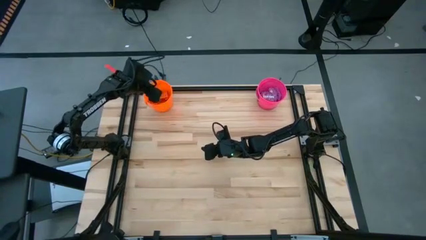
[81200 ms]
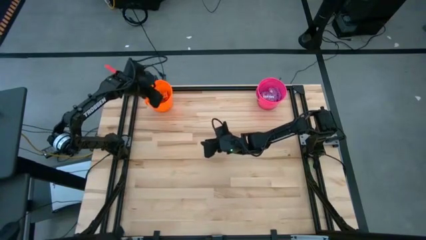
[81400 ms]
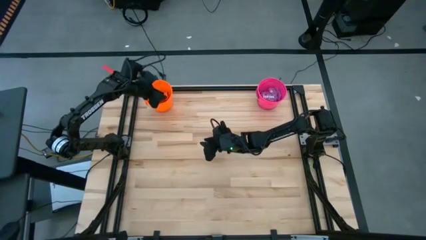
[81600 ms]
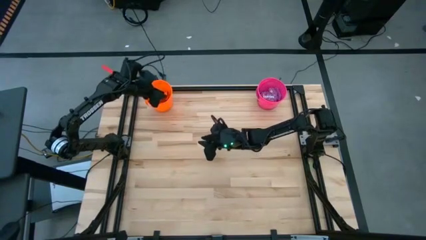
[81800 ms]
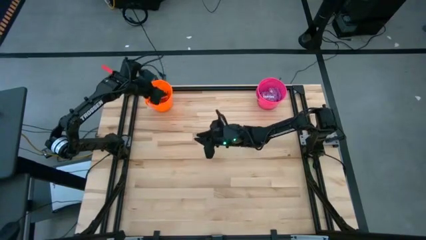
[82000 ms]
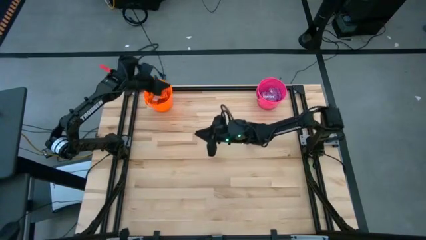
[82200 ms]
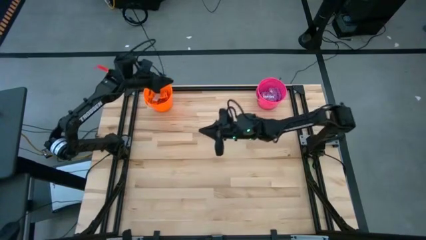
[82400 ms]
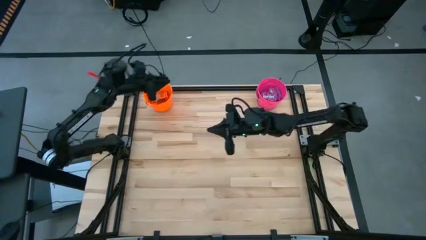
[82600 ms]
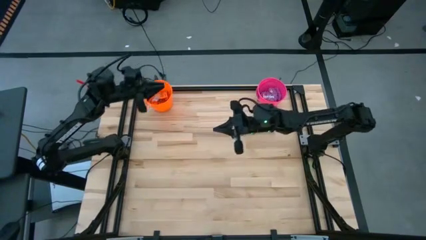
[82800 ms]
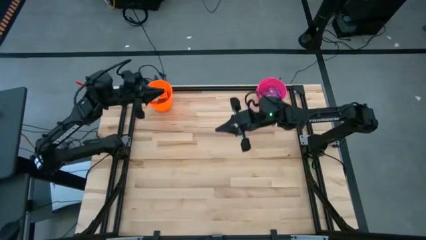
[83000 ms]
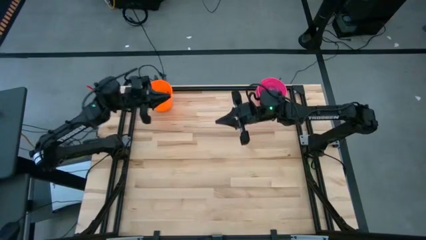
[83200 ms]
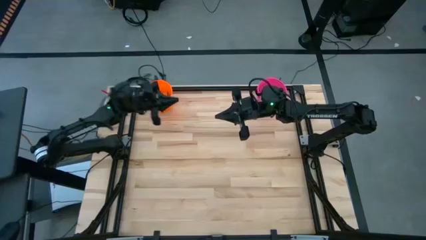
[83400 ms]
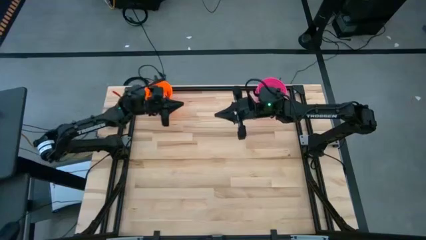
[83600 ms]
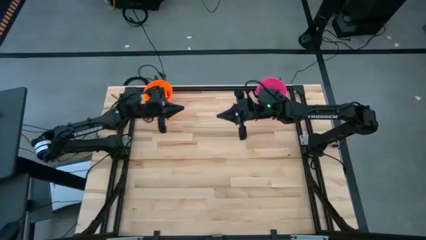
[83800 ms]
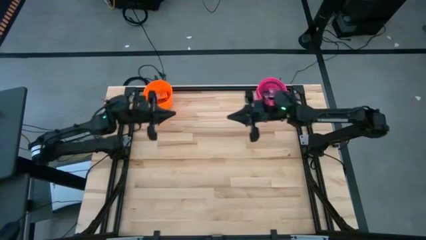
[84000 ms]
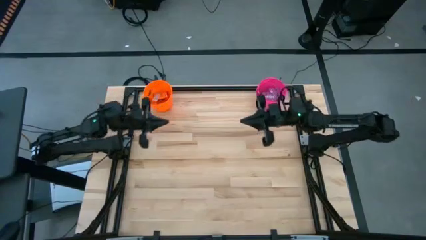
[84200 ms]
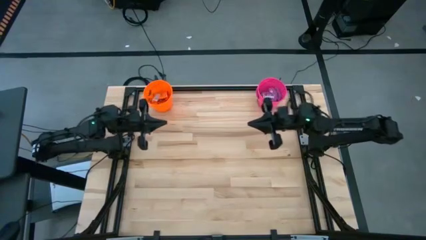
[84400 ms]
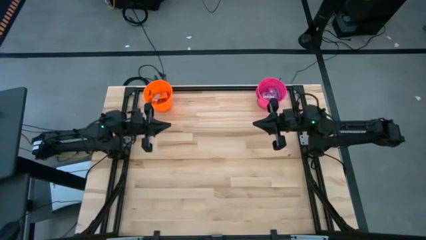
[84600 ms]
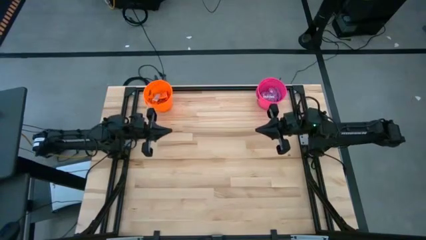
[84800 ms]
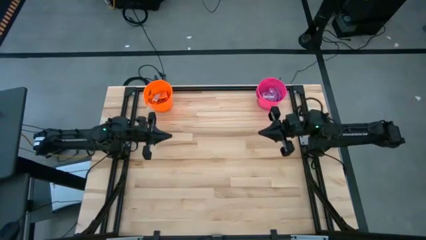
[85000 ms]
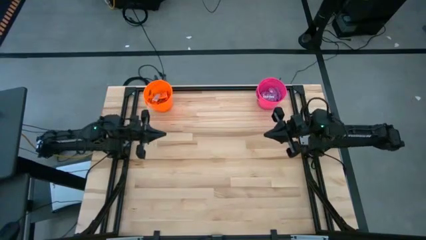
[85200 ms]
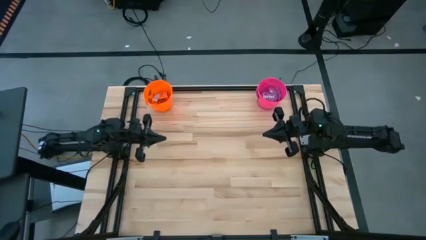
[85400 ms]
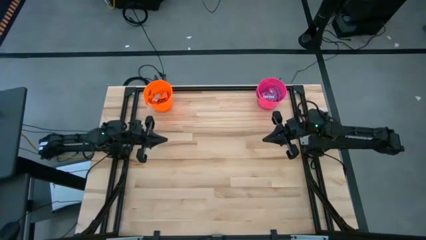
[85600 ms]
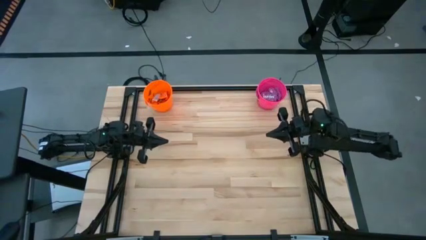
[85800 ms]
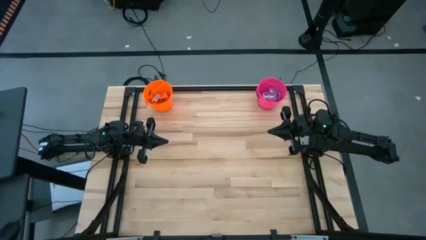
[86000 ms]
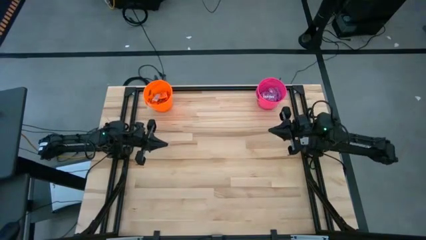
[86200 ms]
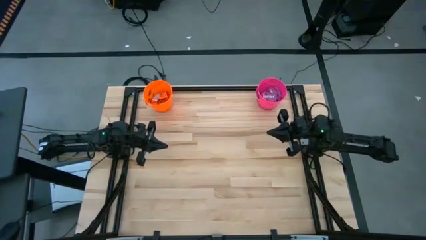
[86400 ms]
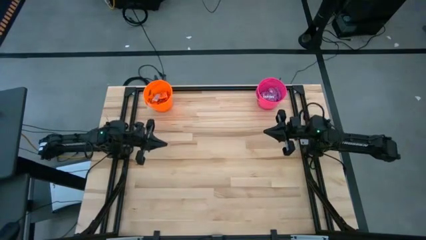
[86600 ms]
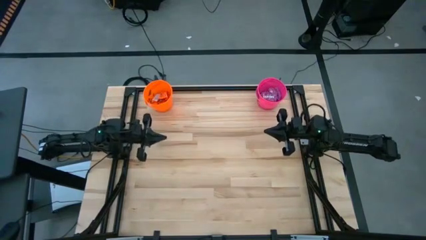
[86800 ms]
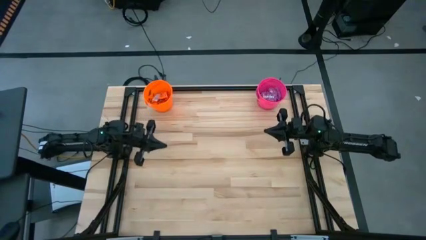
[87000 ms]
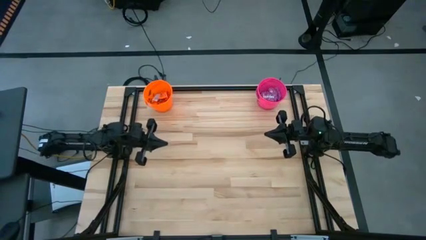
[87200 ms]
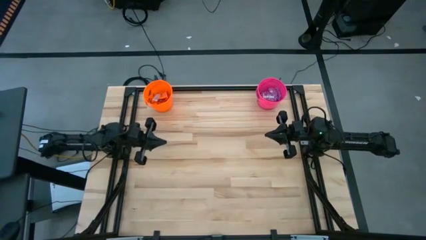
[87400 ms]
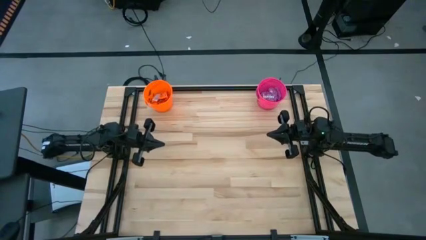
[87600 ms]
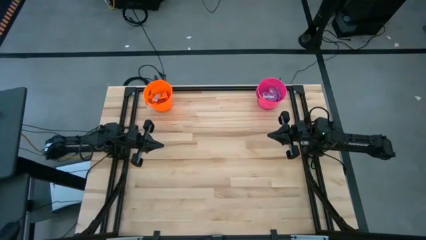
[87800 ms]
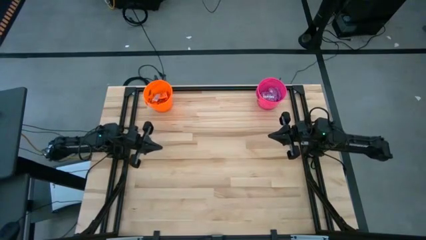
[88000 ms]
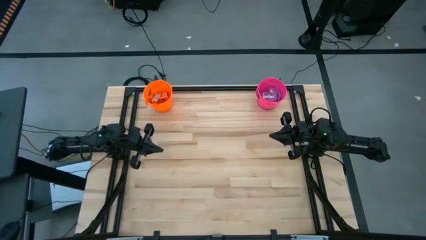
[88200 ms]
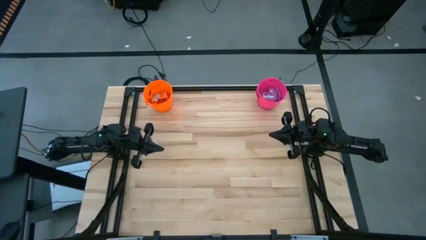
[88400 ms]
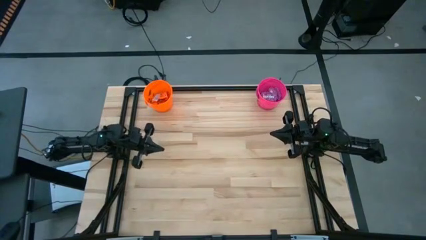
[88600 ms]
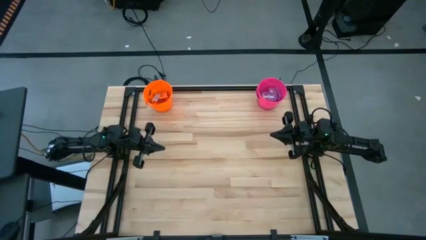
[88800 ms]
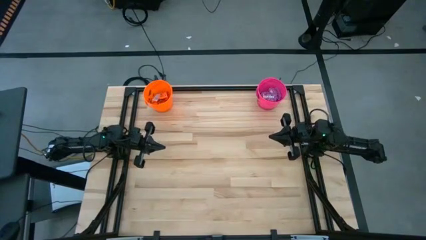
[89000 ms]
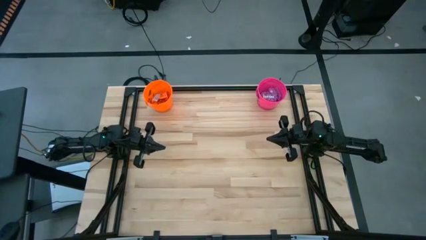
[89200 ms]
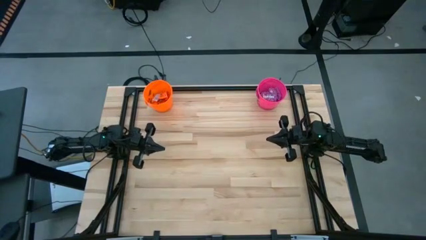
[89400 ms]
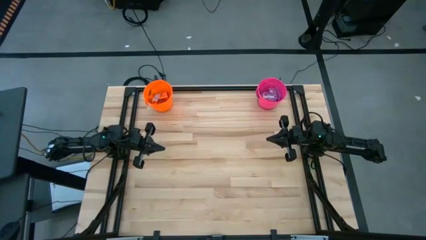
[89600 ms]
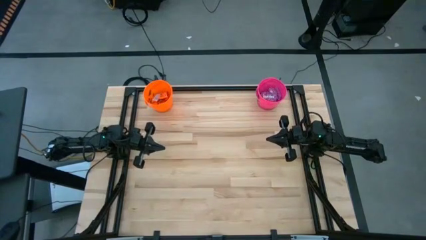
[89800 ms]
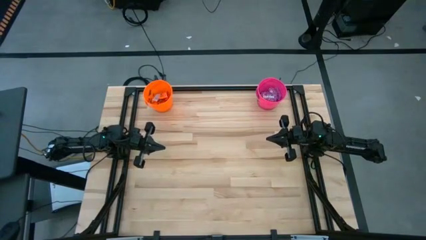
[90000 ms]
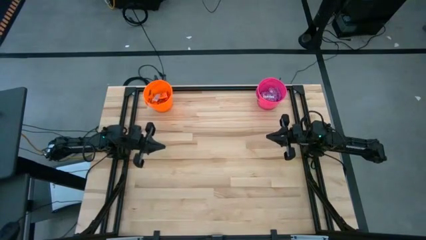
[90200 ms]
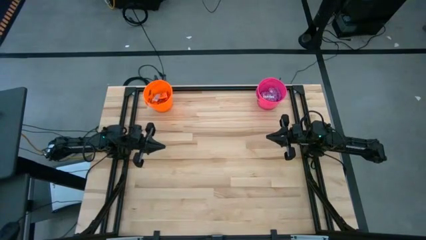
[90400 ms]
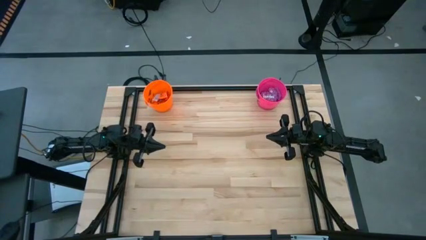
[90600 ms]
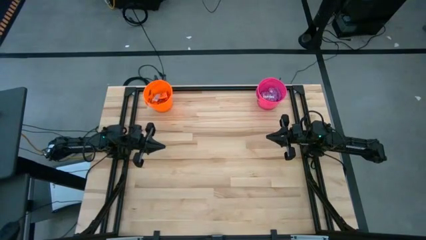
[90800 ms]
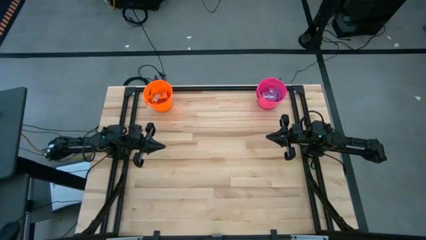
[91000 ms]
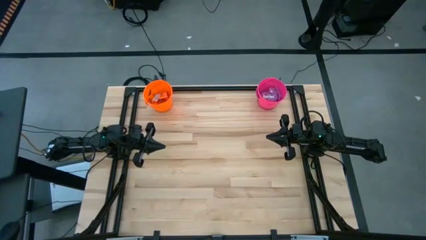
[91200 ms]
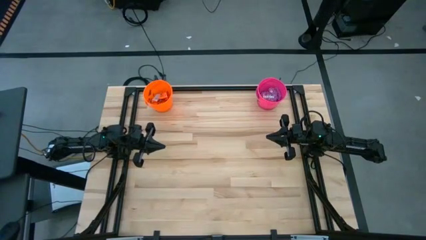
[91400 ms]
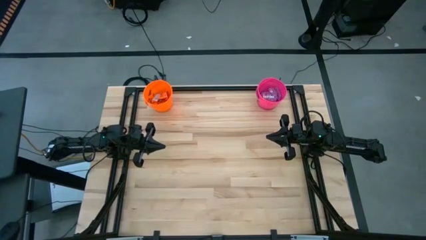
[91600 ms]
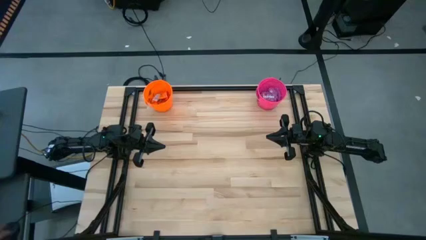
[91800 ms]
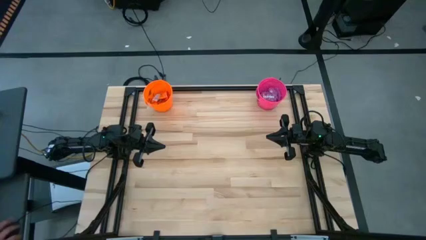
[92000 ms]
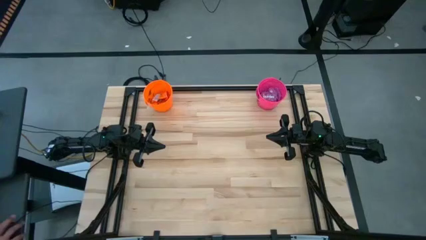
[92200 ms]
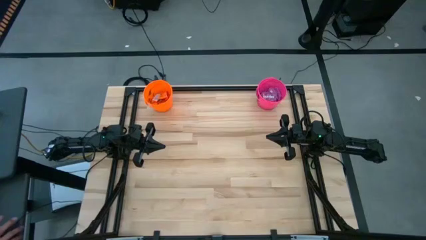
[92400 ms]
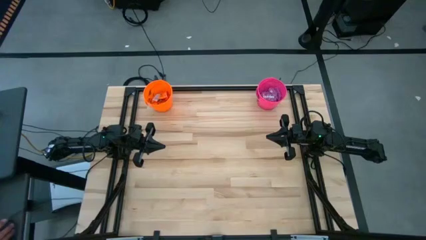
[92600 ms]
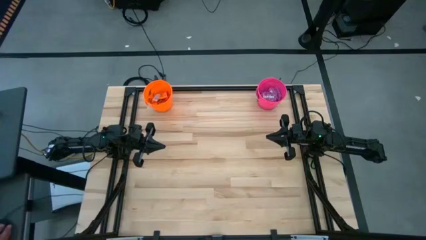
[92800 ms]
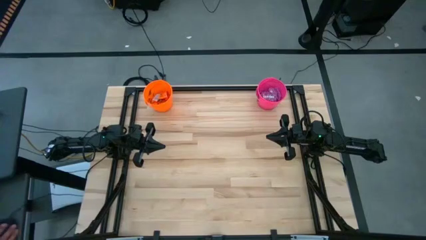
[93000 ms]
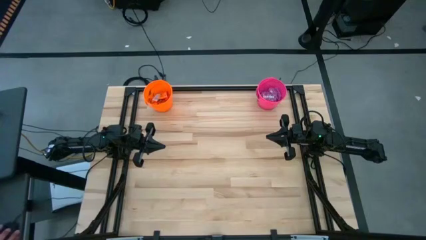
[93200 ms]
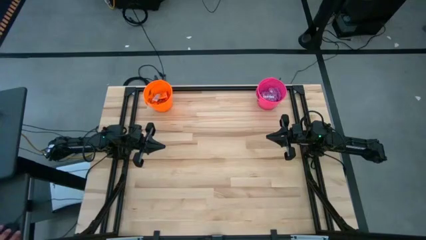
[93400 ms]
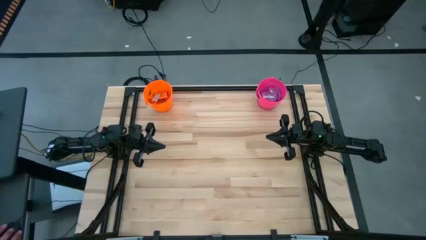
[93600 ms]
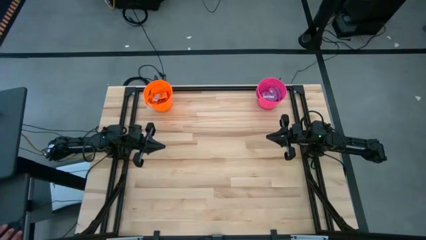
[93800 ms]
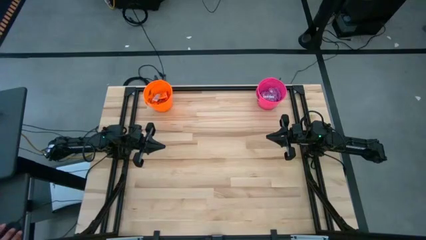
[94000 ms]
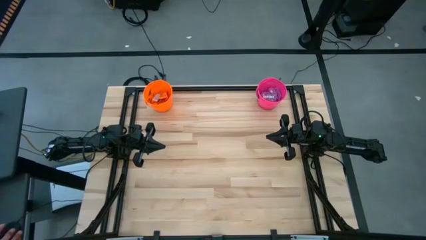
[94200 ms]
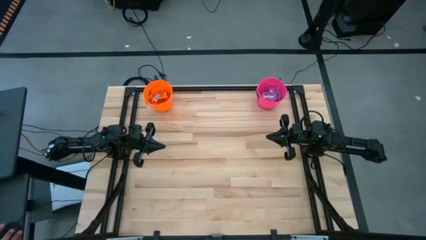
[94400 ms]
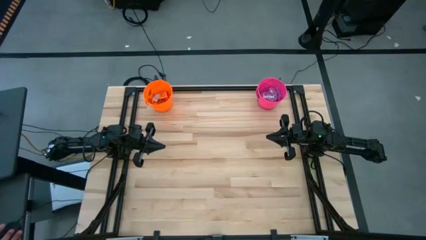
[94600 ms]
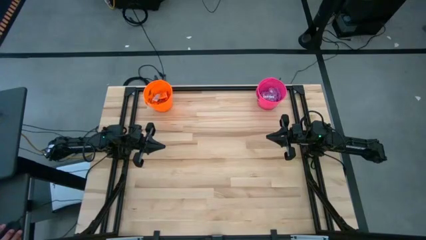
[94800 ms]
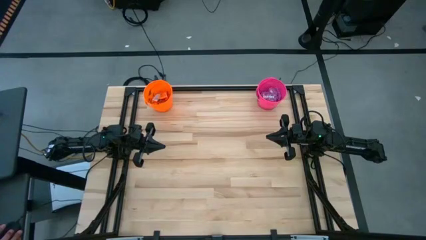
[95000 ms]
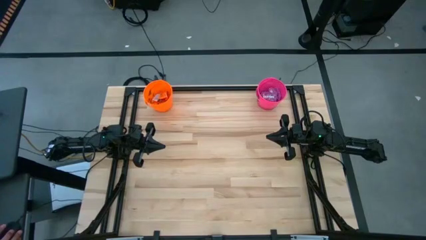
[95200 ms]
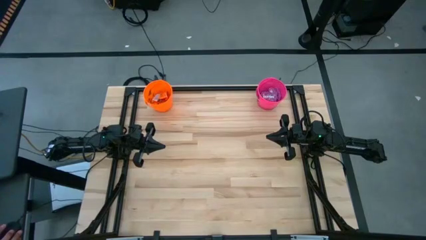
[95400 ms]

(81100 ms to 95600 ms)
Task: Sort candy by brand, put in halloween buckets
Return to Home Position

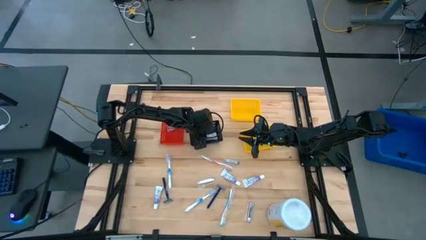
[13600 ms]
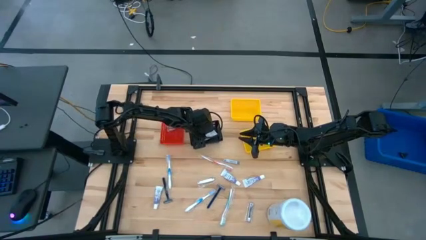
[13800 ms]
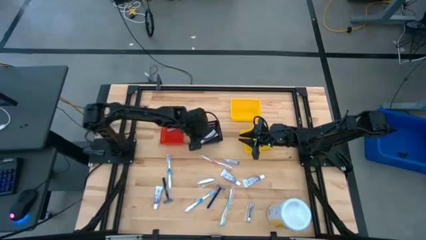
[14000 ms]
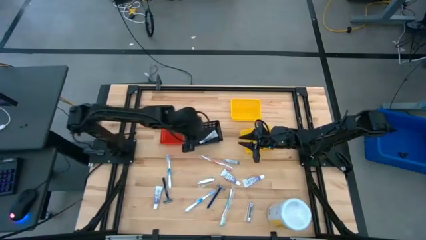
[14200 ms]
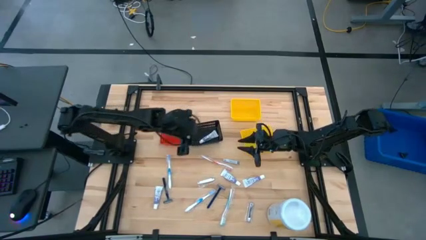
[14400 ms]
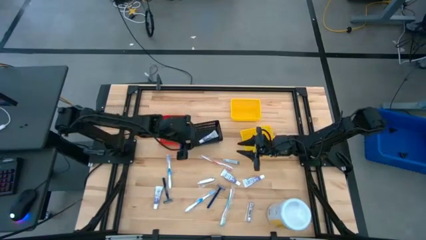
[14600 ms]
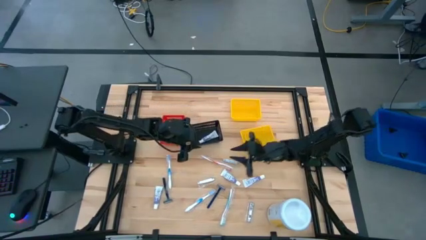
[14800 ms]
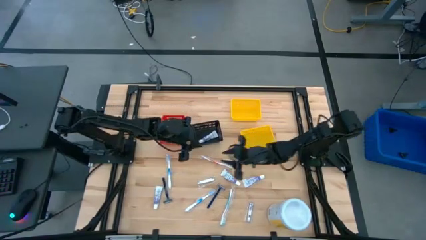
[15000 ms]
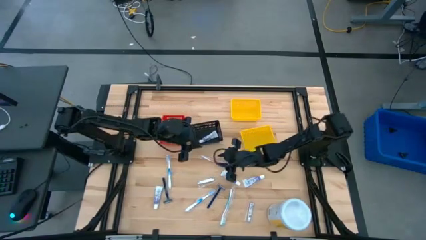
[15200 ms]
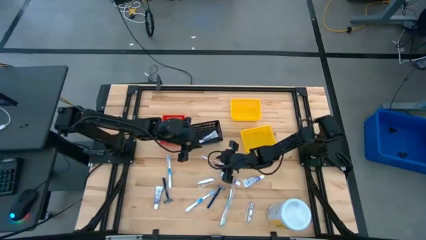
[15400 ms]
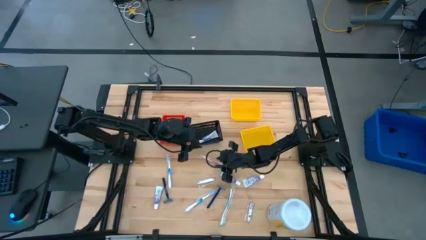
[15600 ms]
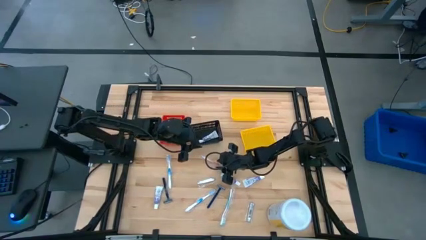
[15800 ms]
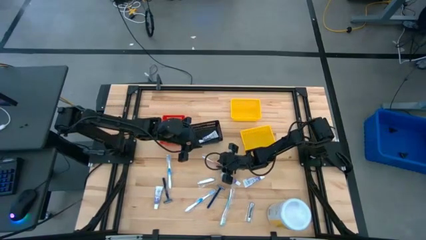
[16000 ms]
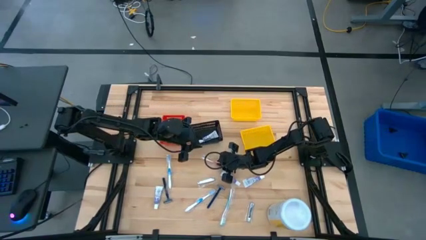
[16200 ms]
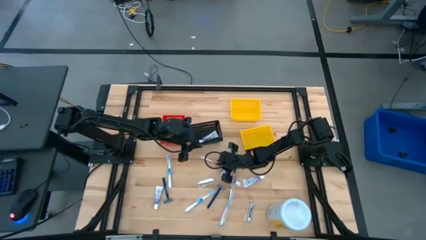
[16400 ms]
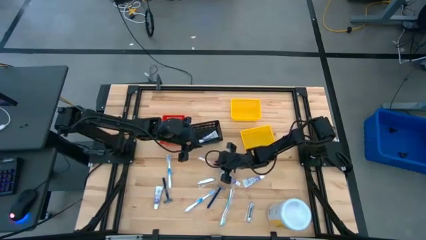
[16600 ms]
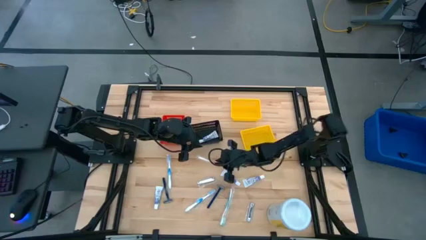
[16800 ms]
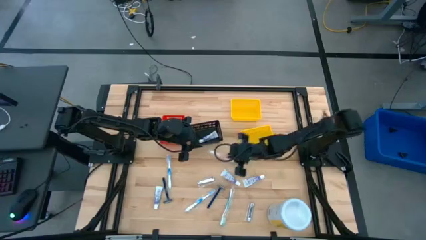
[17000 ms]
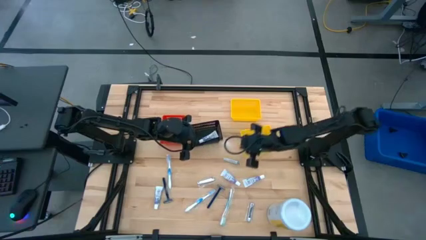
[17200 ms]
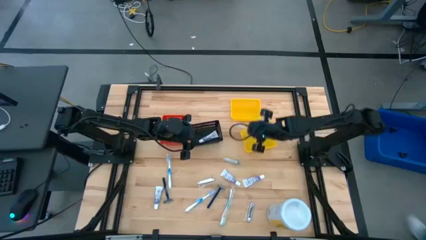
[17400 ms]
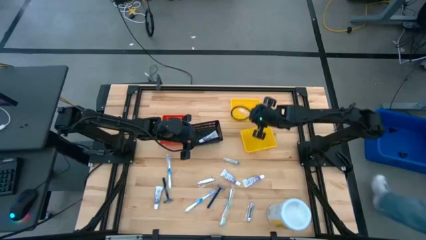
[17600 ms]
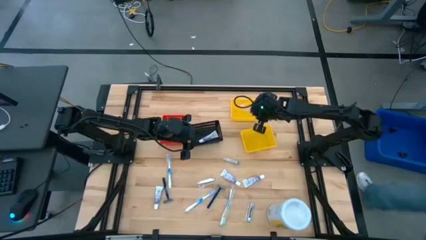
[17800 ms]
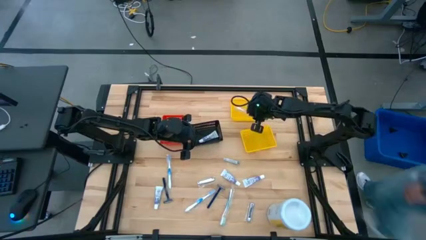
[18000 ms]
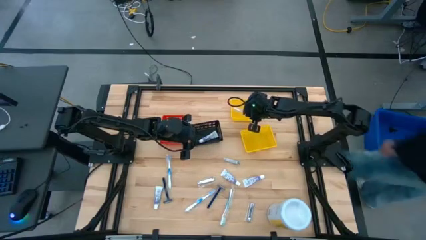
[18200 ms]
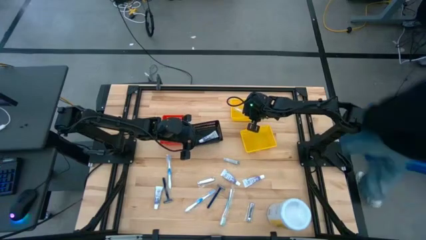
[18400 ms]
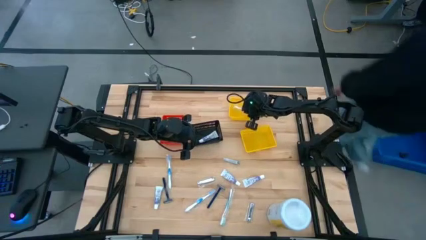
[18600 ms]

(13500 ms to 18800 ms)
Task: Pick & Place Travel size toiletries
Put the orange toothbrush into the top yellow bin
